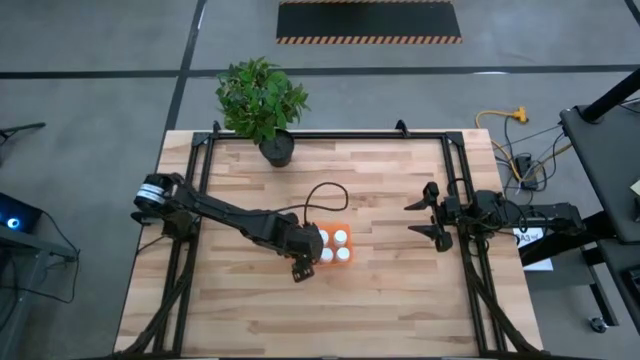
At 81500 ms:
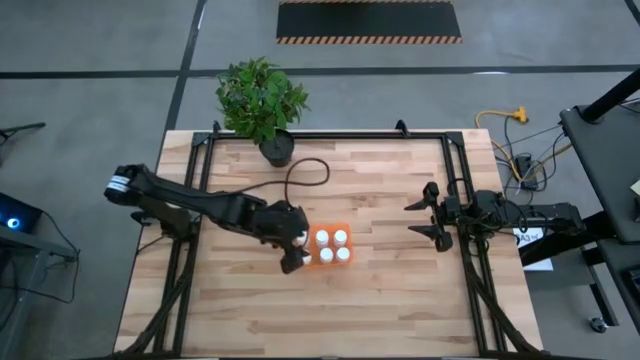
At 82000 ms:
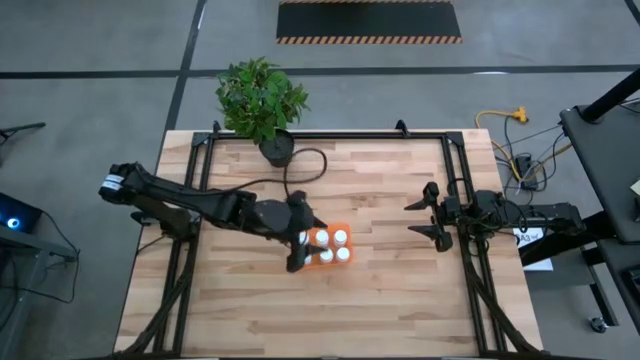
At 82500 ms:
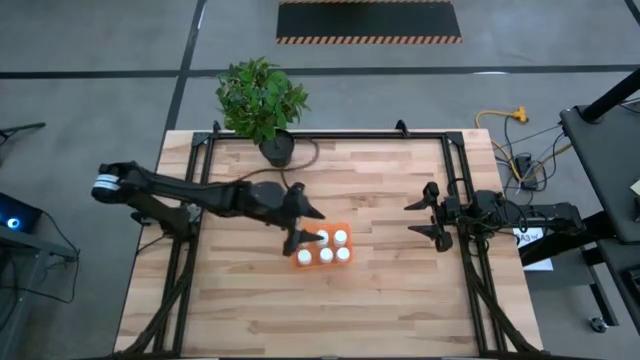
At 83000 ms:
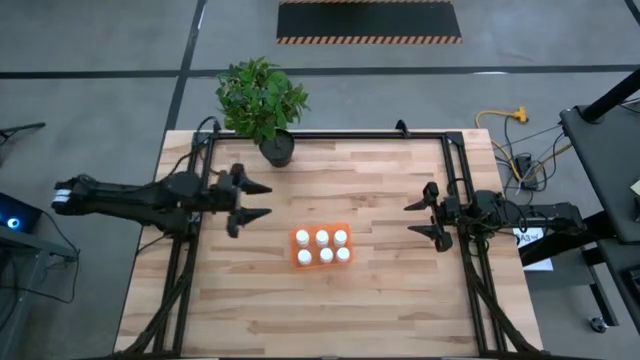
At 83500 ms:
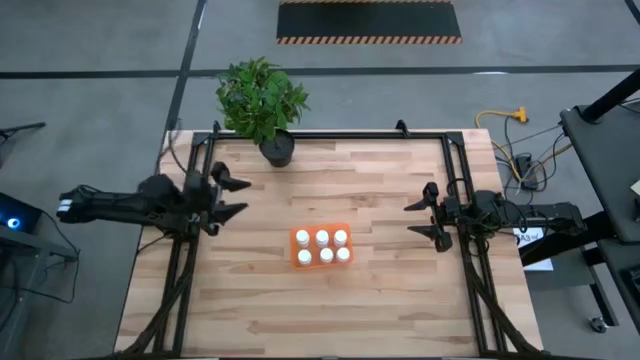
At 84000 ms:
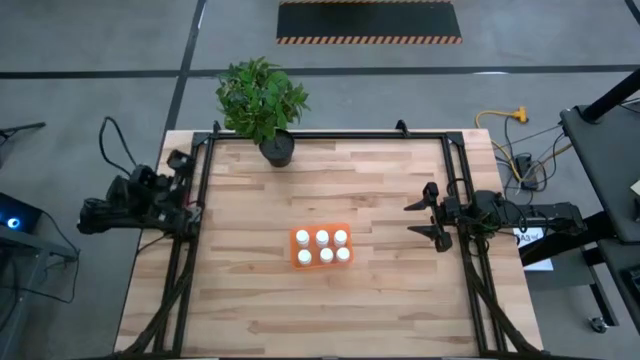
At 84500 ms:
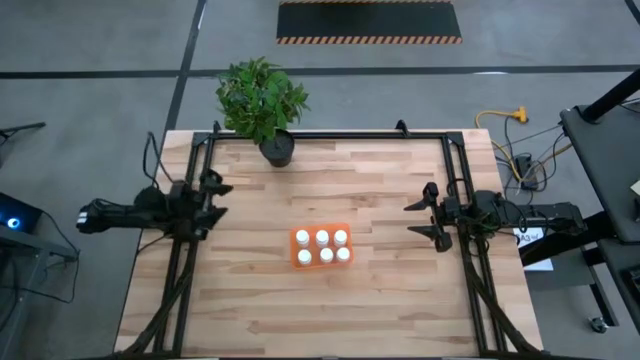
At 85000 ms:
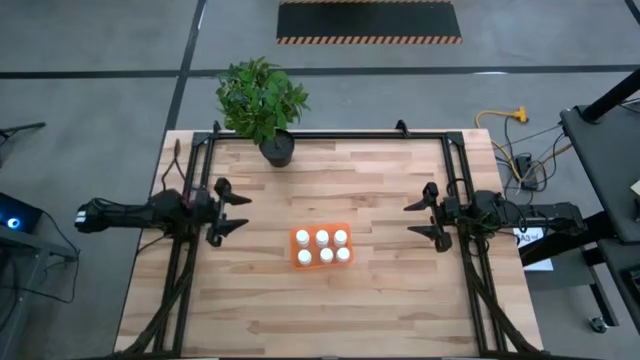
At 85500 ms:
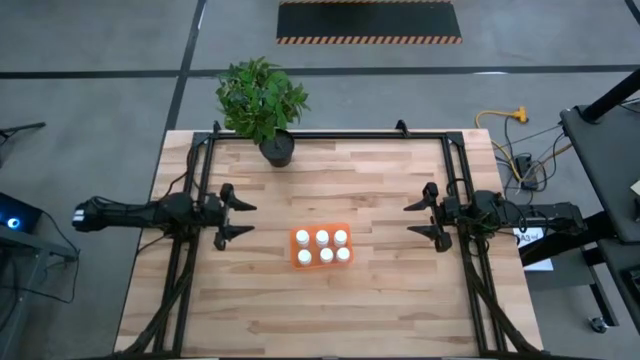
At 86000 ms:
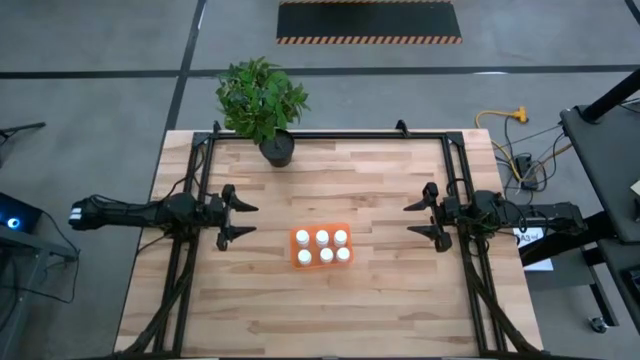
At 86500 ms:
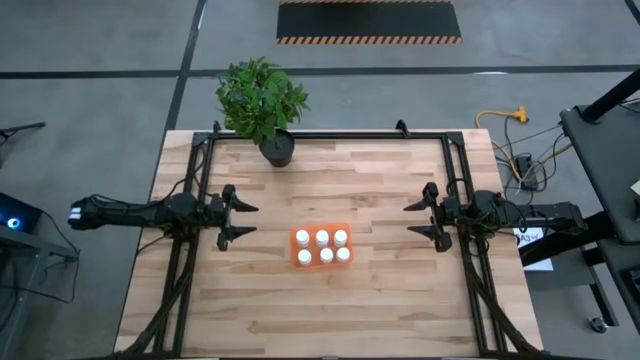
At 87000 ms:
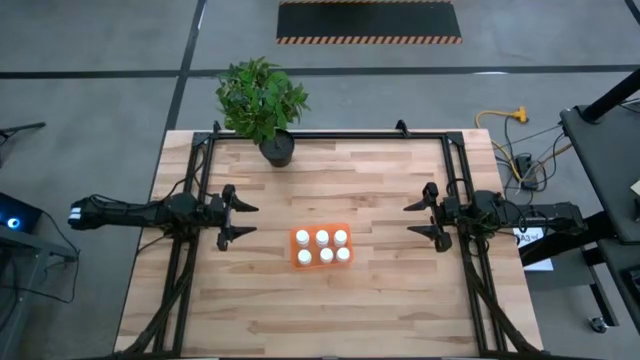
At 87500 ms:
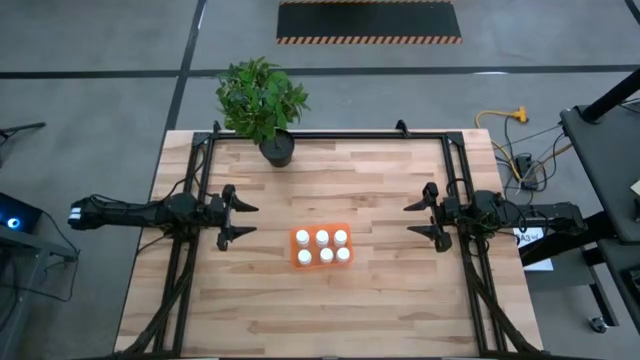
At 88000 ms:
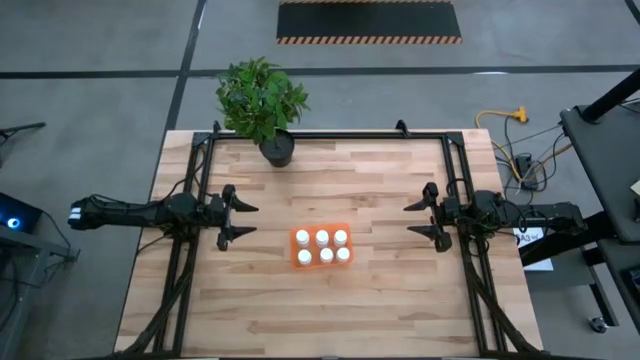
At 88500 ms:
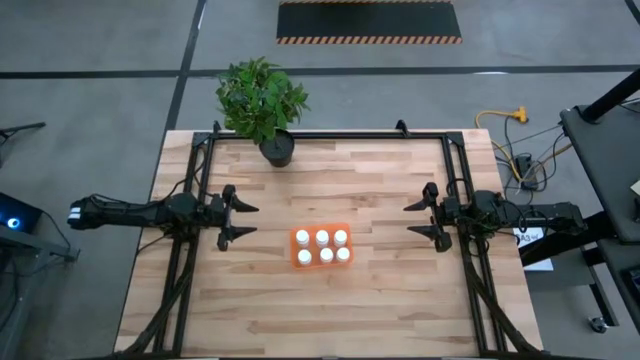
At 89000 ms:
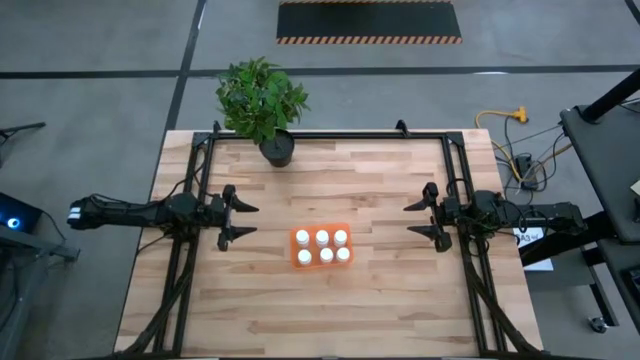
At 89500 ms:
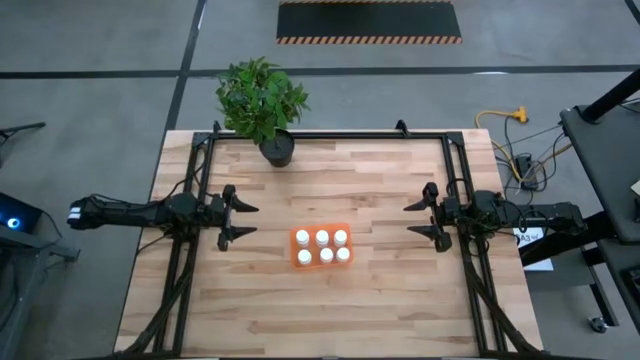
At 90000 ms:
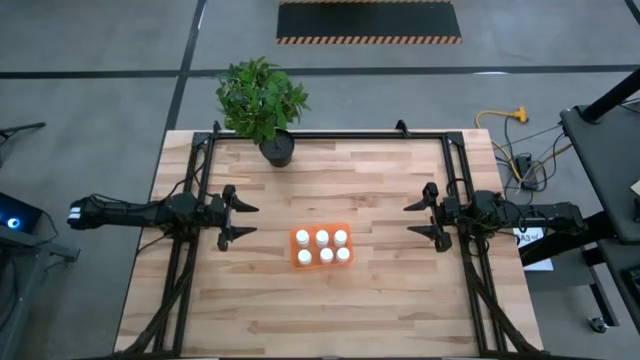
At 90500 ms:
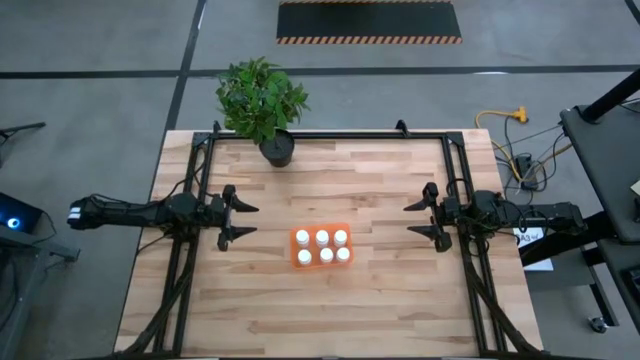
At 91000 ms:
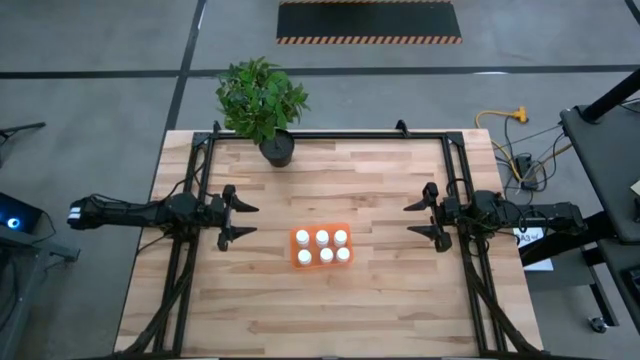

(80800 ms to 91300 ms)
Task: Pick and place pill bottles into a basket
Return to Home Position

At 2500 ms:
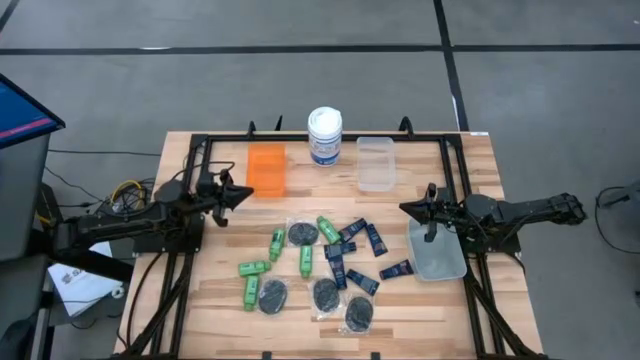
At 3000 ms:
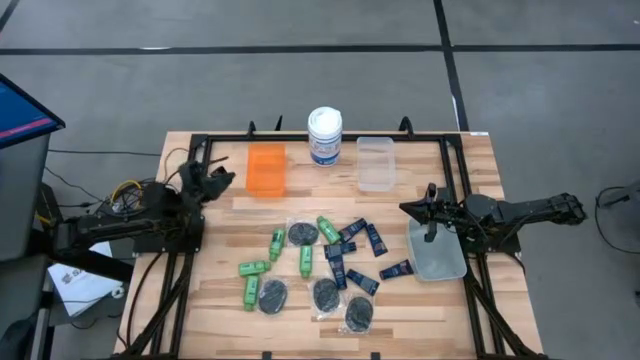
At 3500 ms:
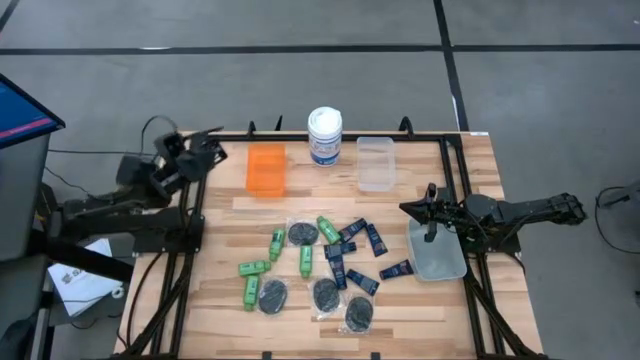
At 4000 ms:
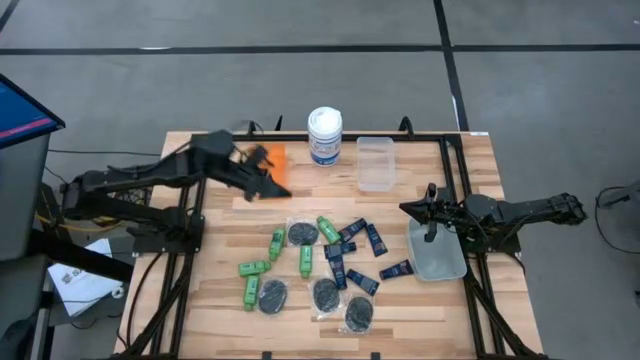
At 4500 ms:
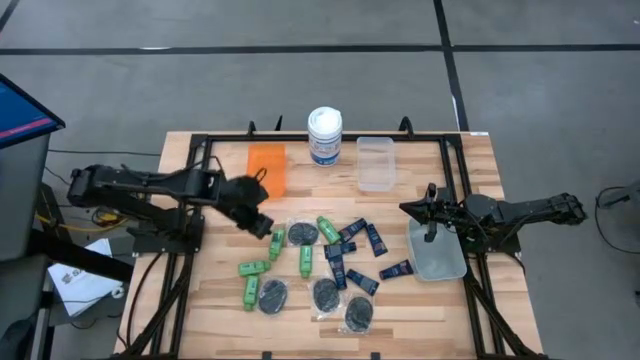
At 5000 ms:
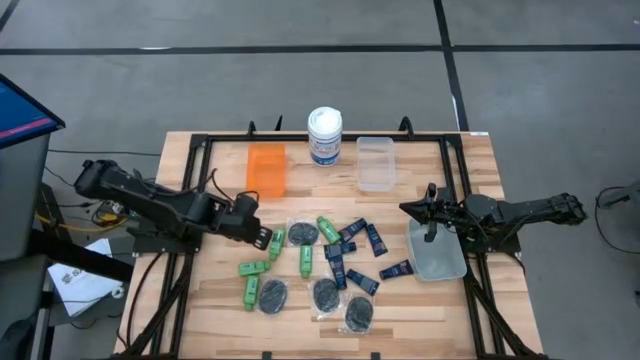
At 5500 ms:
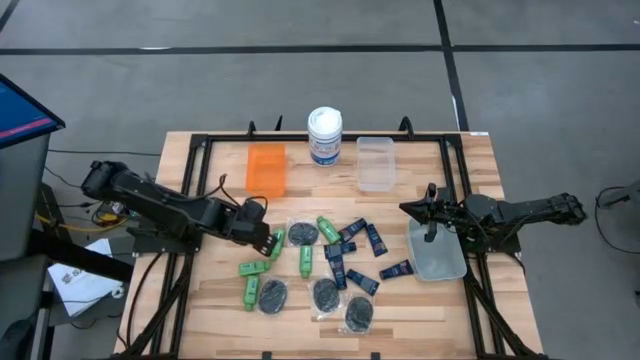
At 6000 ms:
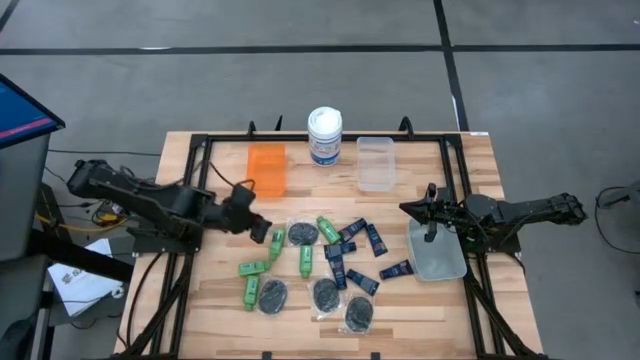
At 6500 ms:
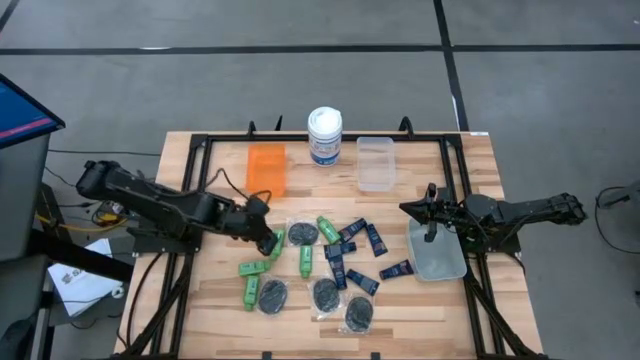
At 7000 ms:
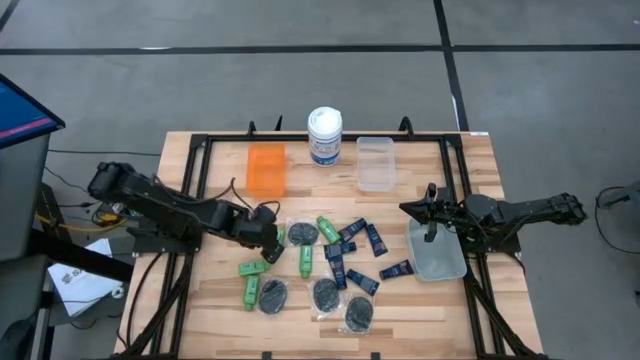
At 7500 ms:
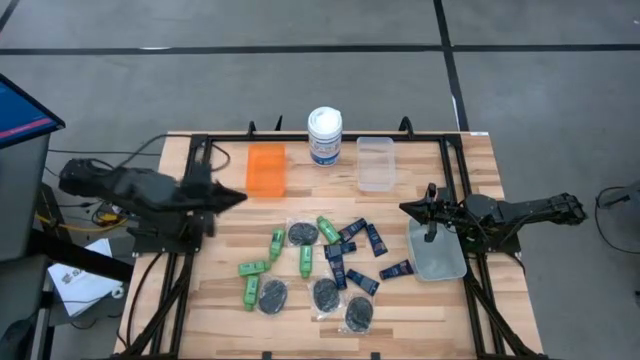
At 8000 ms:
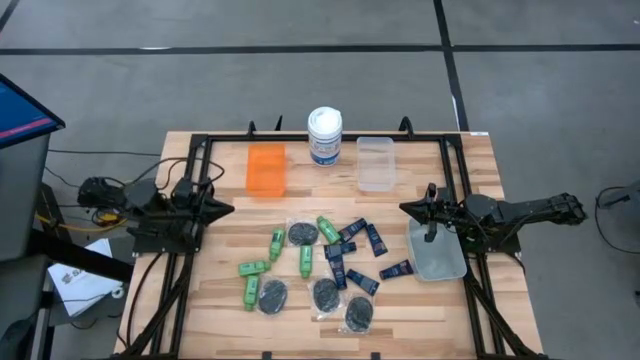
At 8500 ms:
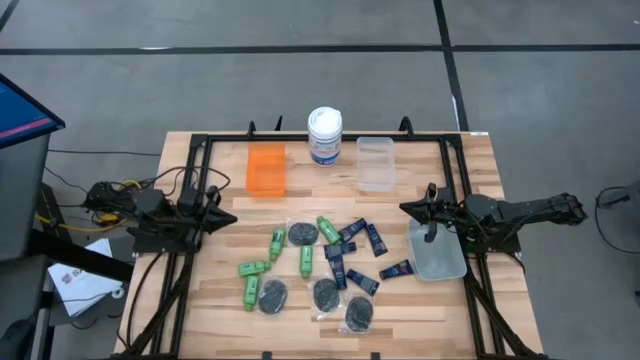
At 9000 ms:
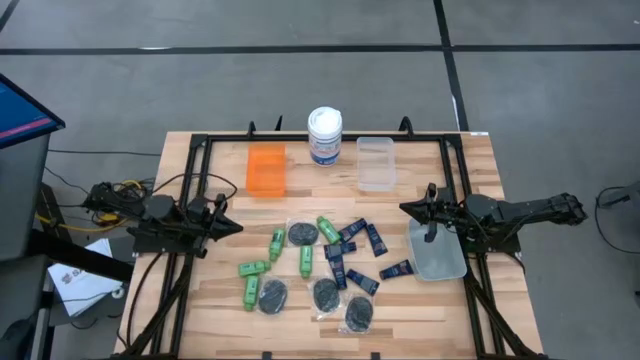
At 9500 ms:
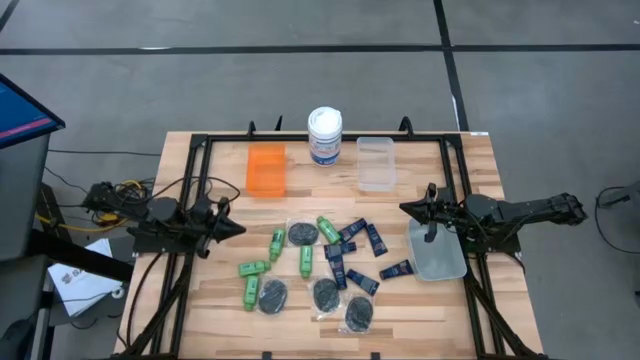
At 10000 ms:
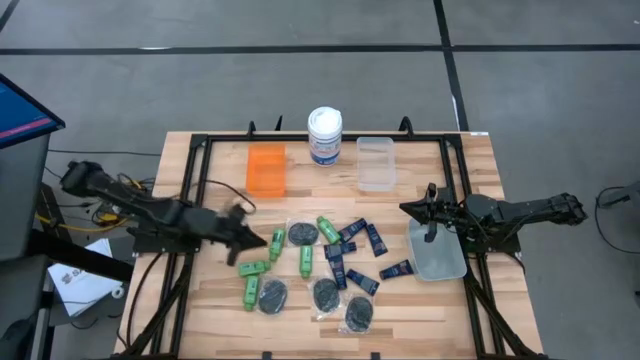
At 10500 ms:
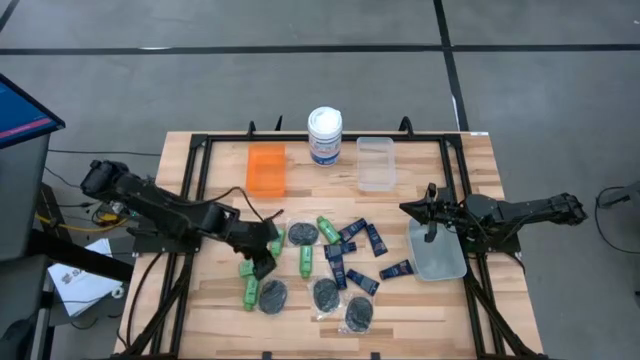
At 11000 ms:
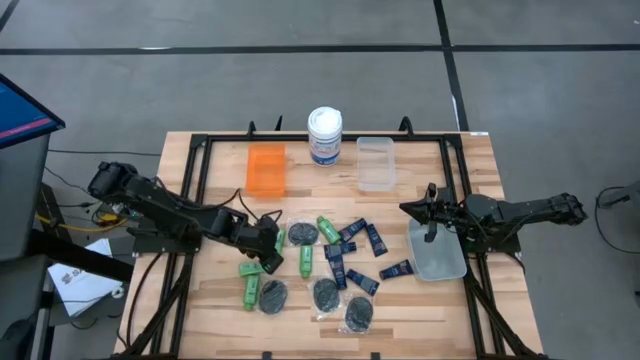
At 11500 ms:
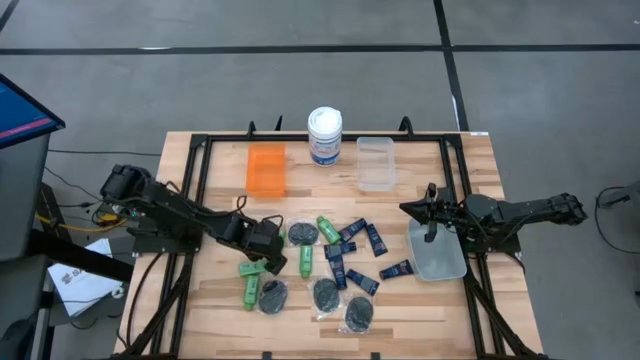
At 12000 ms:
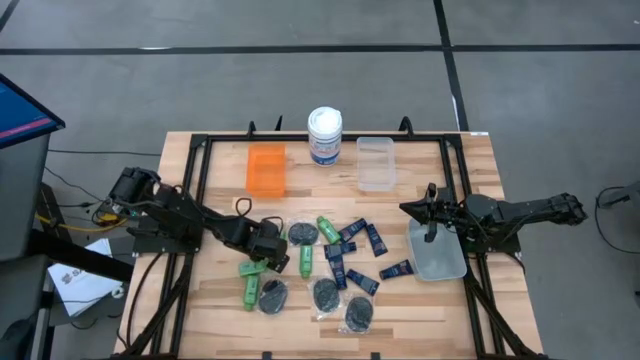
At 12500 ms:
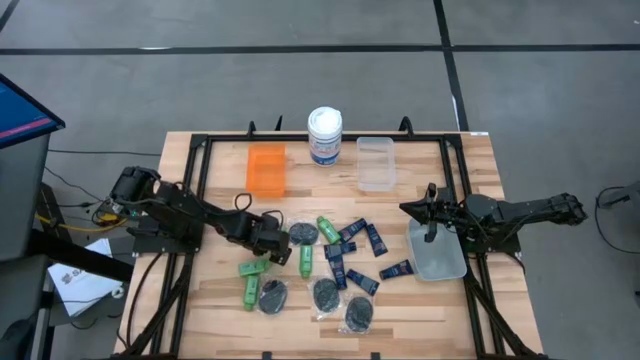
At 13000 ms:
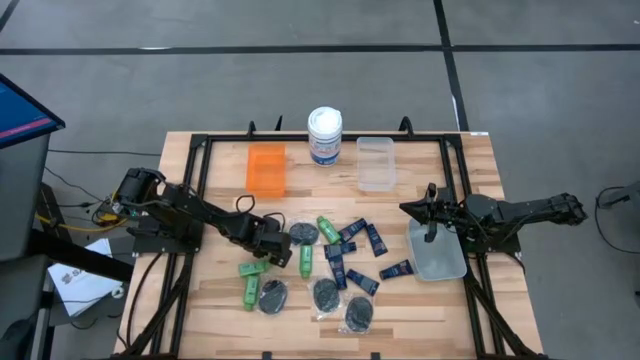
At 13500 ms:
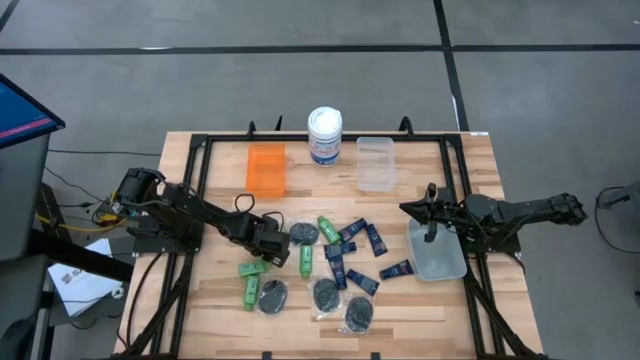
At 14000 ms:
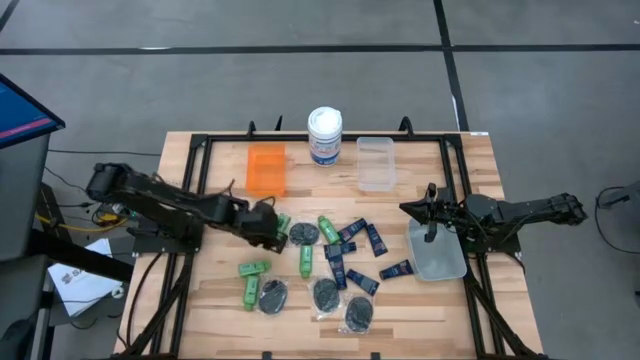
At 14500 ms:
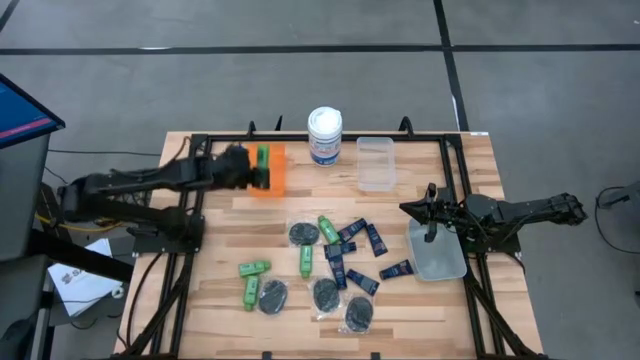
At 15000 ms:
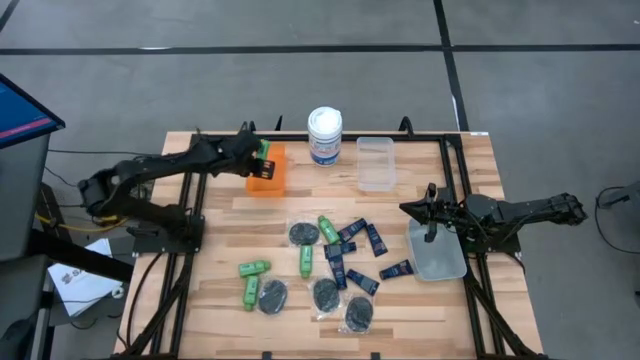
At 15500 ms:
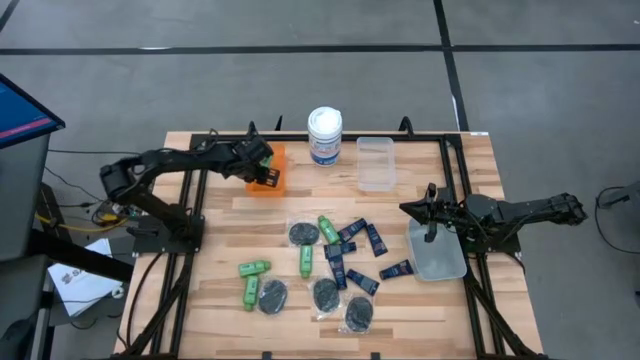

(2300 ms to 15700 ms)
Task: Pick & Place Travel size toiletries
Put the green shampoo into the orange bin
